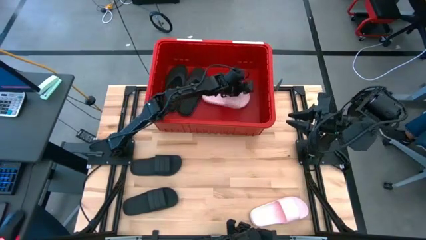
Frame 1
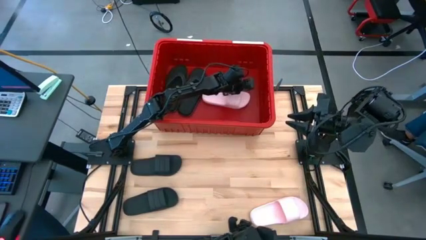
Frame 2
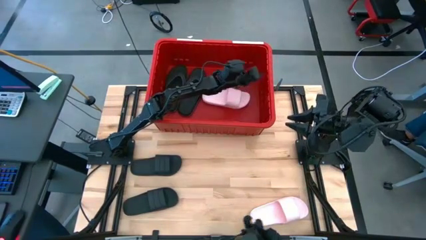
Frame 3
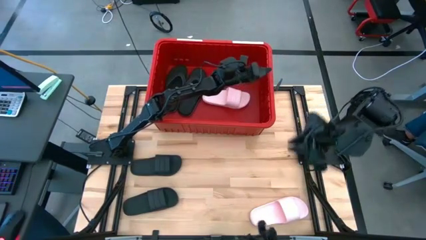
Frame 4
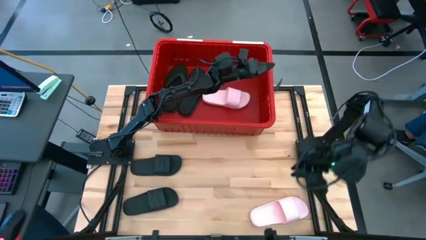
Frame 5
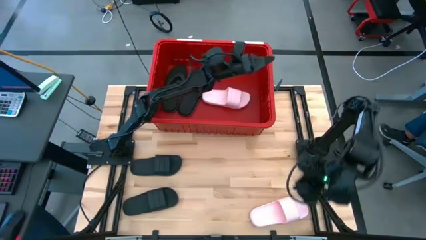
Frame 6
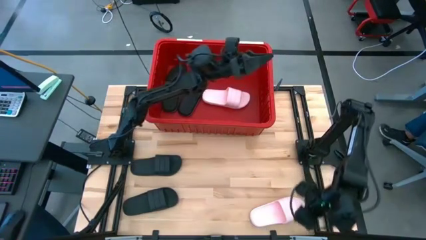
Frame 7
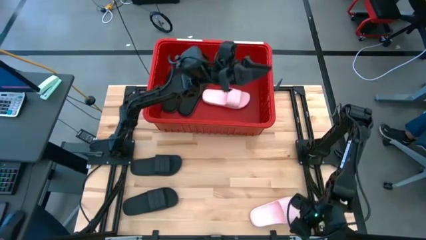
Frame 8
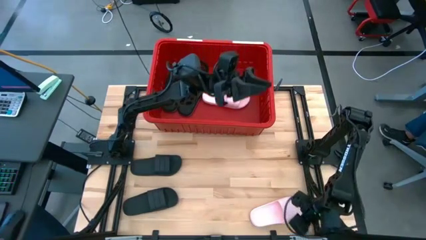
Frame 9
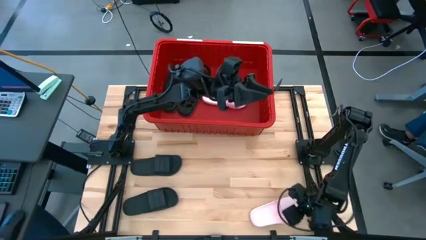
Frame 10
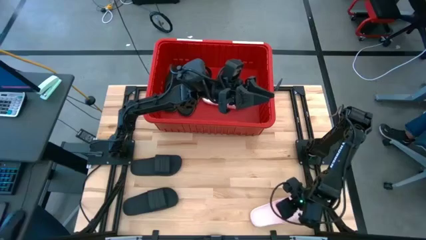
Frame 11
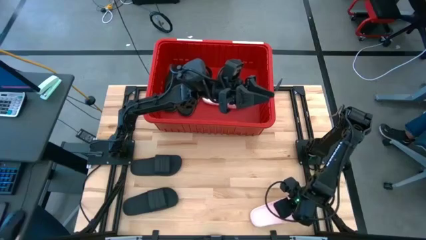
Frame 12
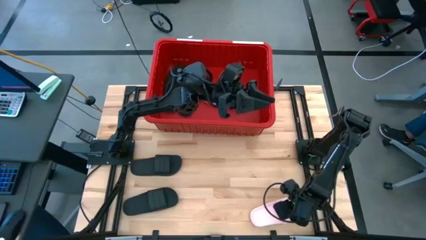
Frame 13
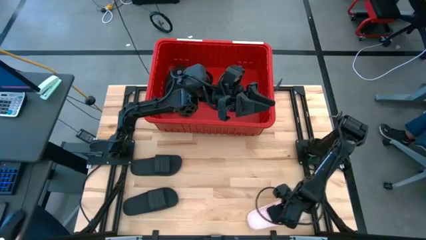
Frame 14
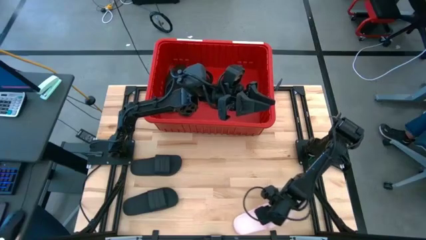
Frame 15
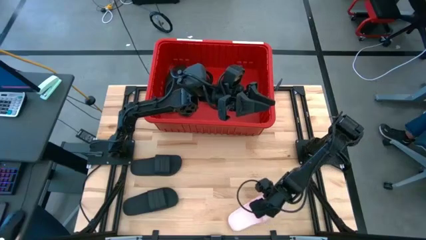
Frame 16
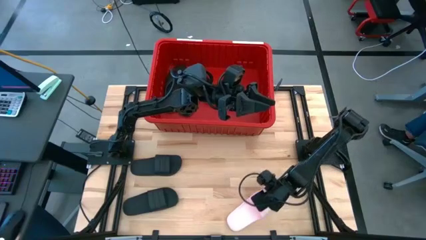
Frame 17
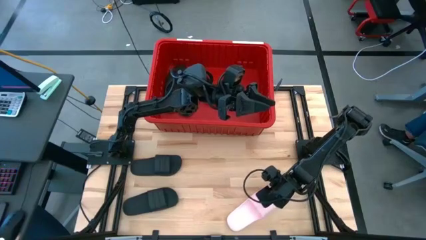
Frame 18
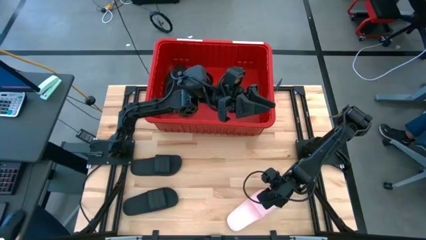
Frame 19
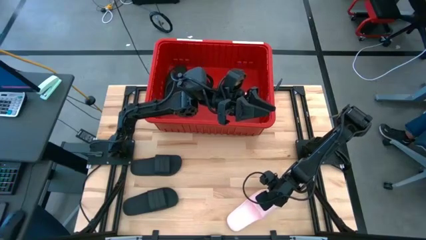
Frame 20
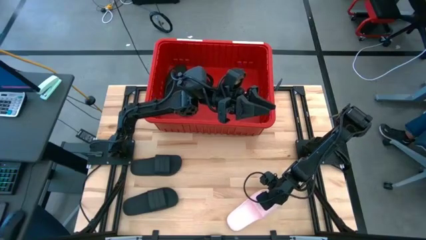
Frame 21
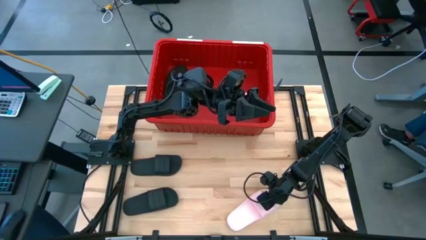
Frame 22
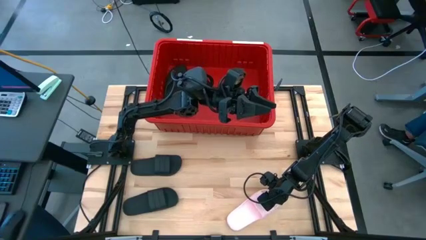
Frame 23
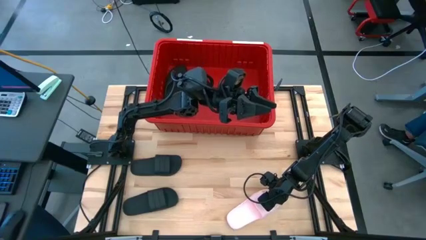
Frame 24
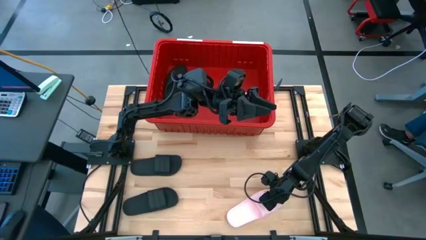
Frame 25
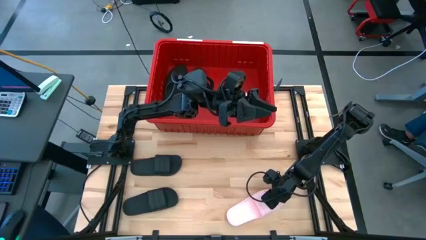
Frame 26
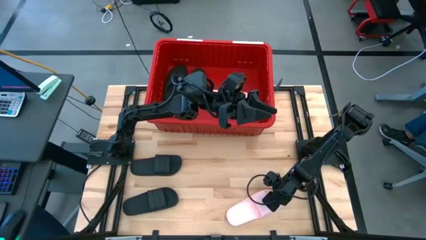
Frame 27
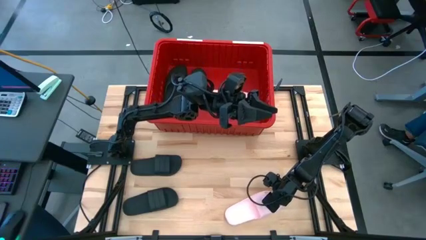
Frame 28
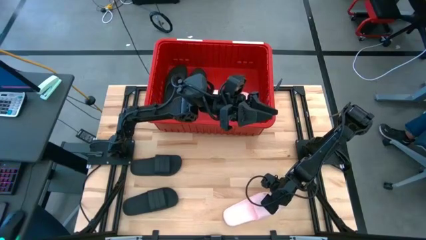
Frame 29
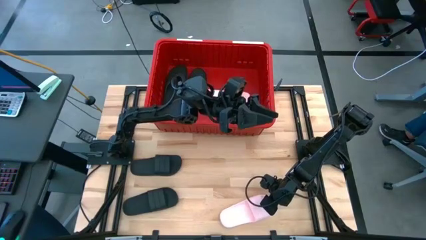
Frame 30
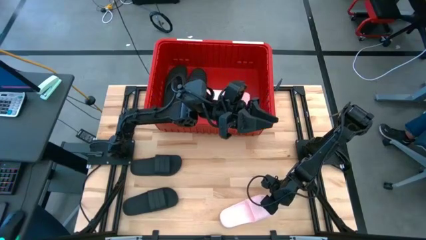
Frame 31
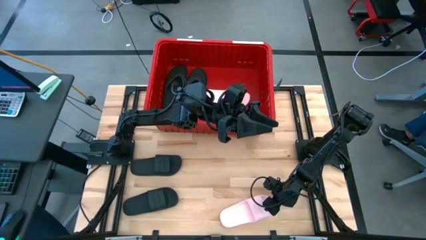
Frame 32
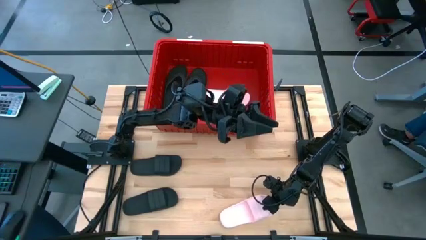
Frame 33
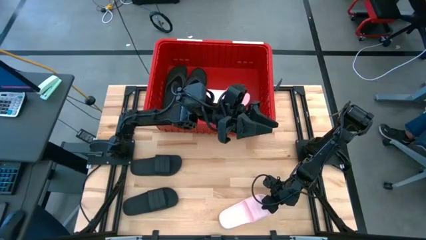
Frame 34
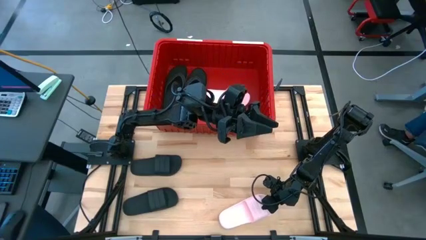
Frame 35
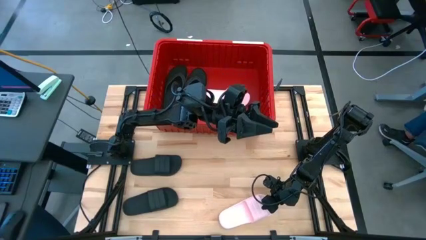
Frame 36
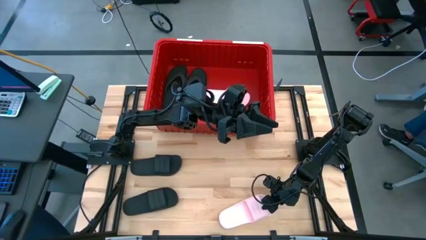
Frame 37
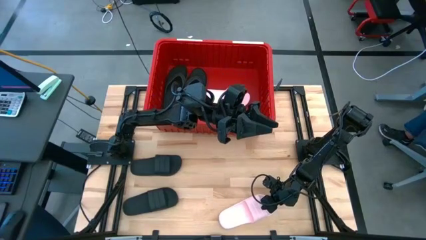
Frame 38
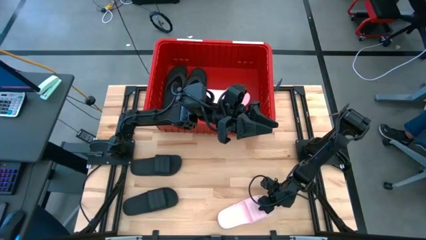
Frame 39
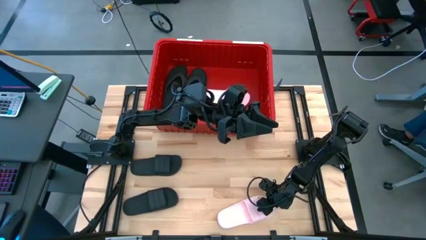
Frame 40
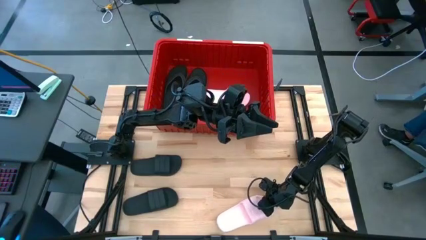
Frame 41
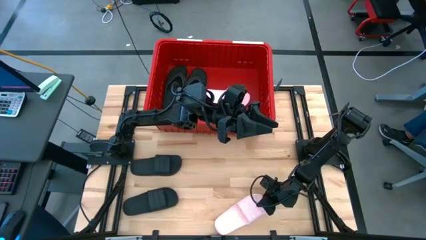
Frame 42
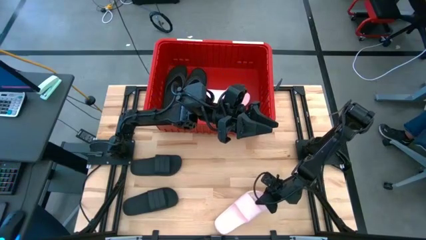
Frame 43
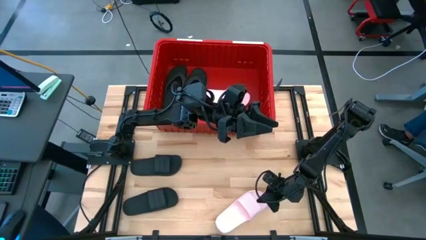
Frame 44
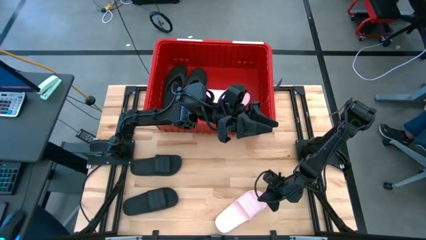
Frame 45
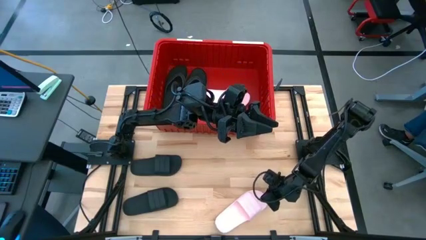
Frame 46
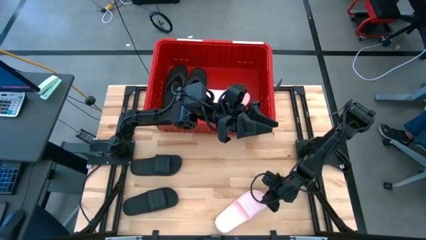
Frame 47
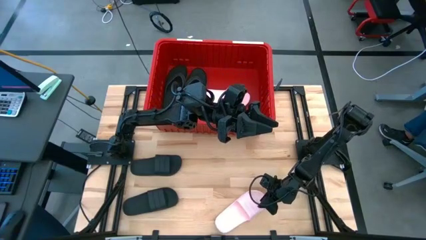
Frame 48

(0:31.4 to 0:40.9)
Task: Pick and place slides into bin
Put the pink slide into the red bin

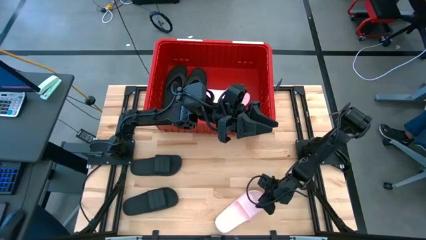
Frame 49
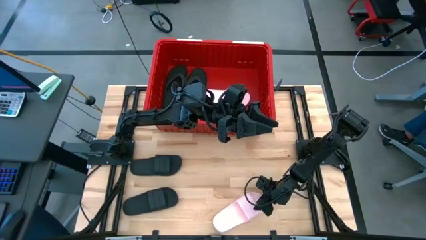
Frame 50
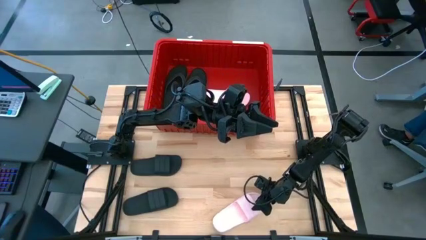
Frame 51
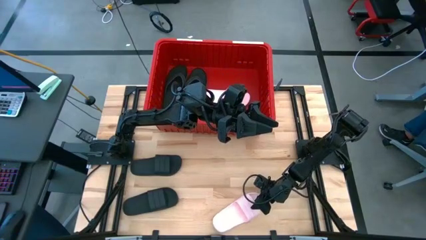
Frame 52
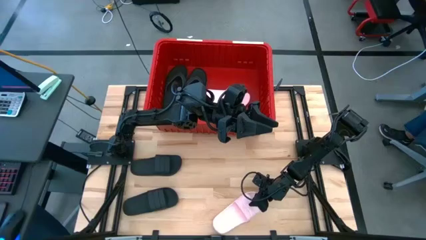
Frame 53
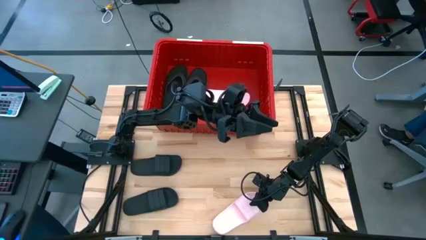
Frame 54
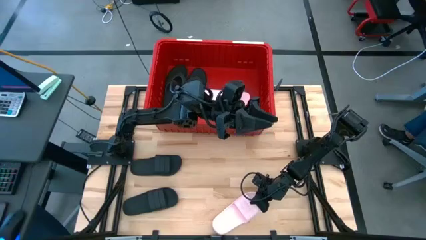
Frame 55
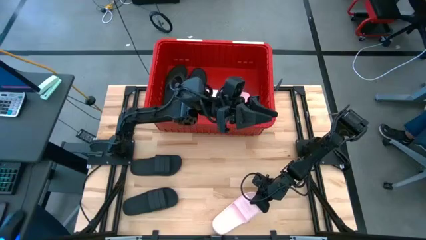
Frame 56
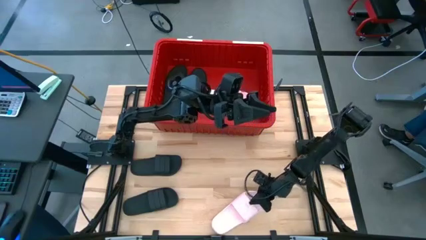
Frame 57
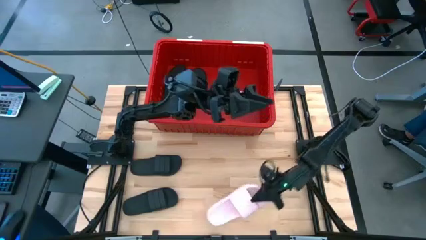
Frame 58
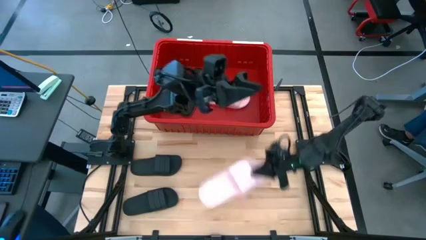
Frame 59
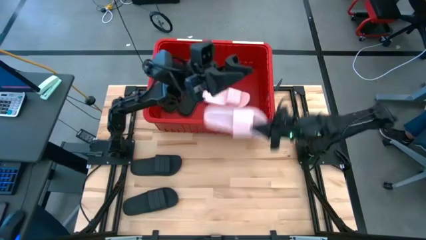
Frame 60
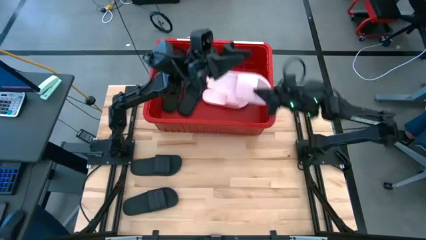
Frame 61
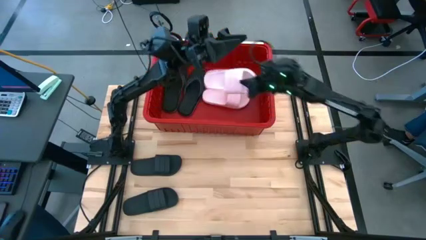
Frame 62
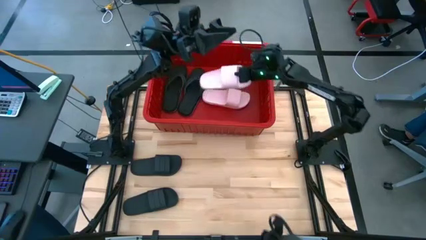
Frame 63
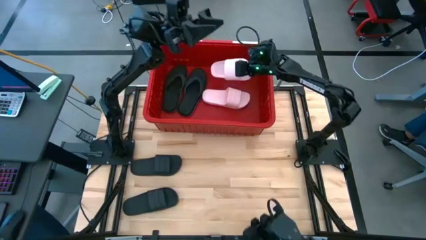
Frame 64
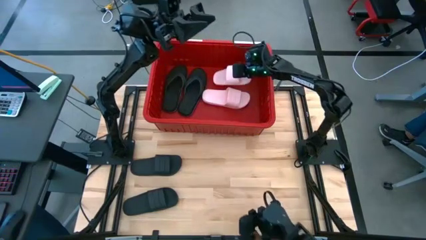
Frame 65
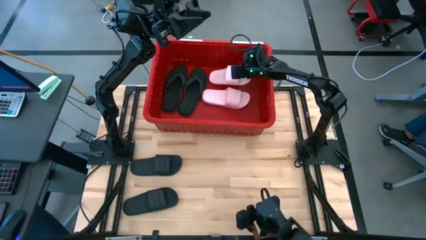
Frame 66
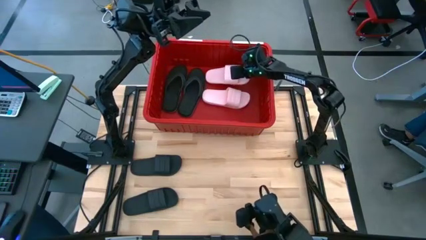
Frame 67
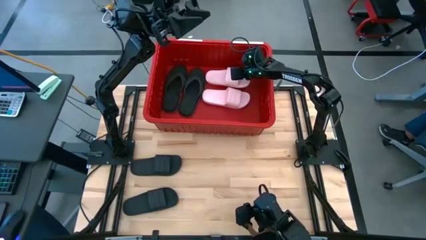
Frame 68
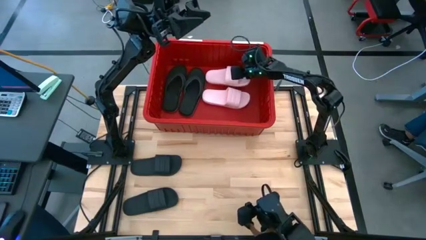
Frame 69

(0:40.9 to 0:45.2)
Put the pink slide into the red bin
